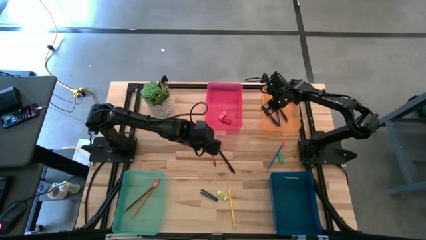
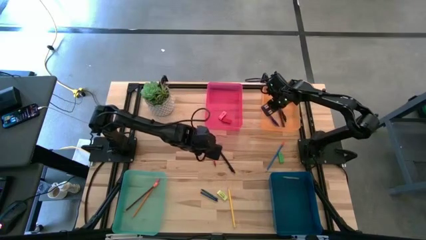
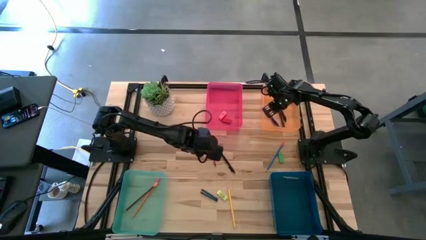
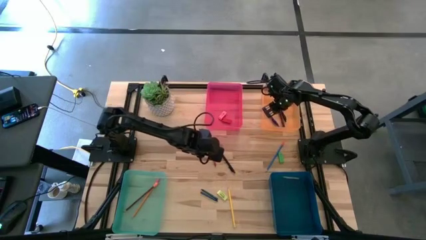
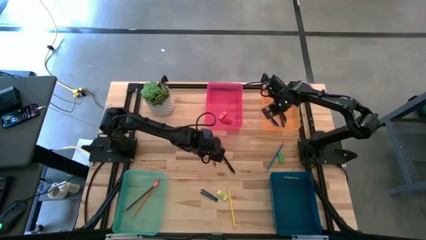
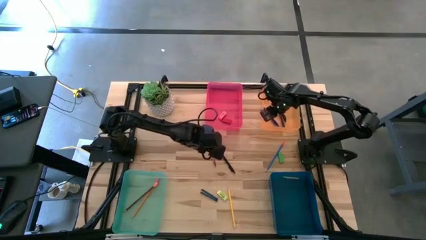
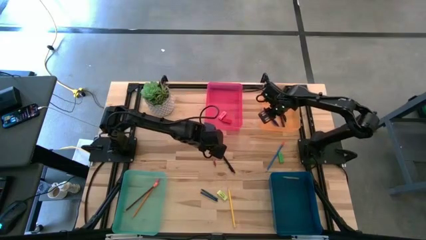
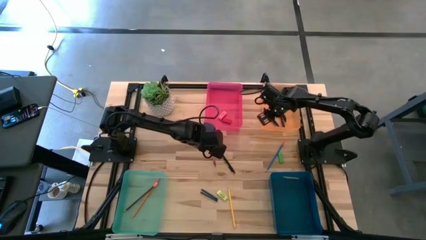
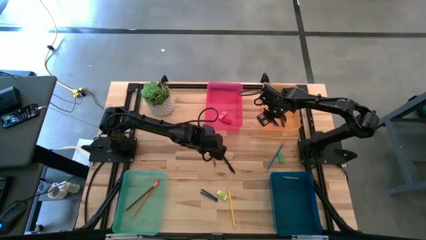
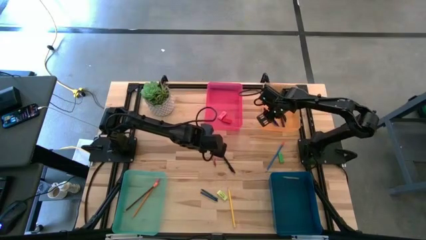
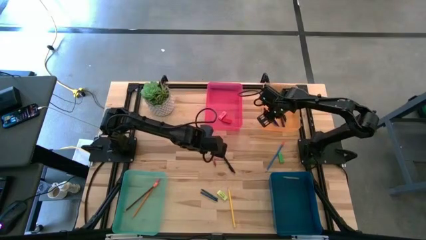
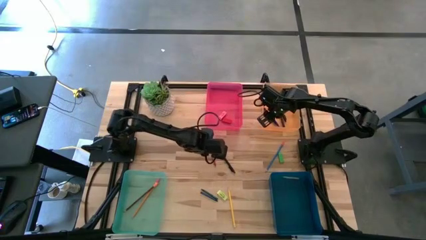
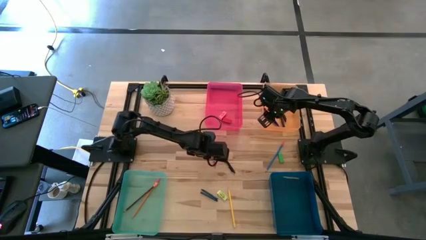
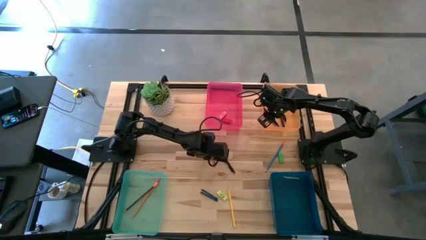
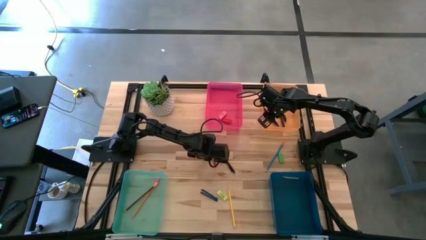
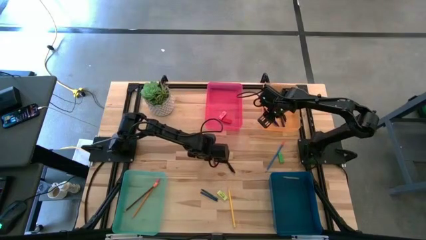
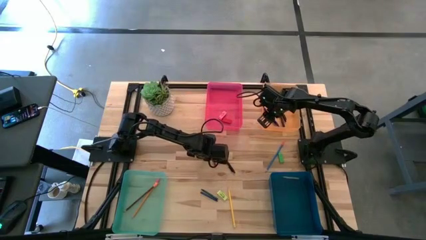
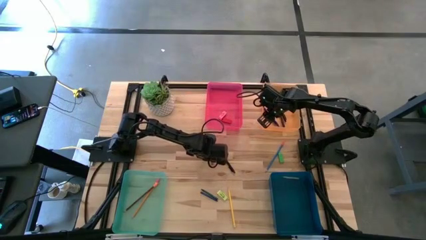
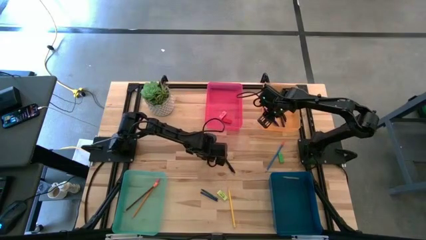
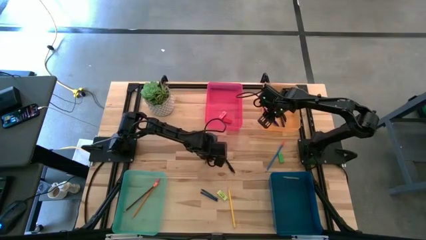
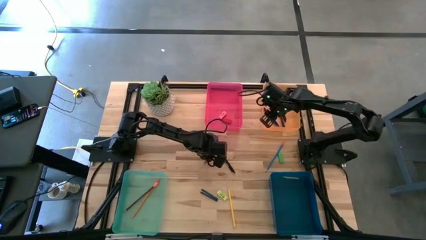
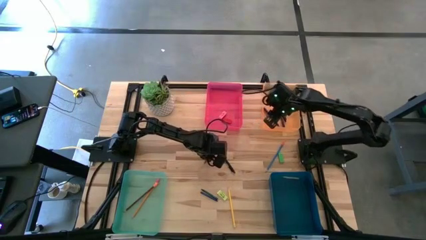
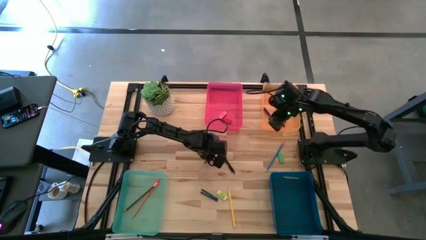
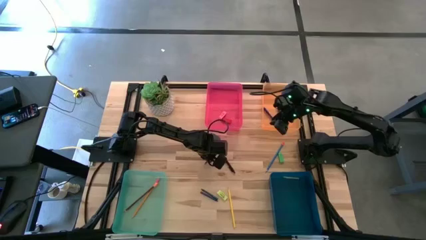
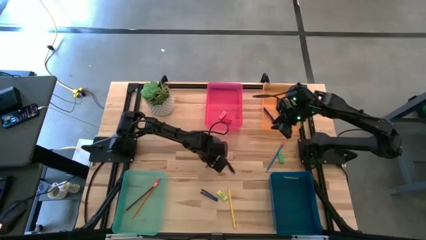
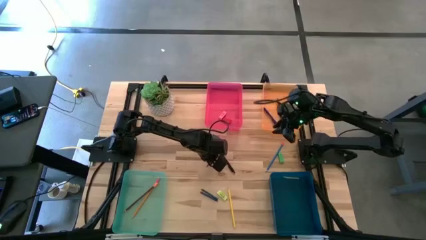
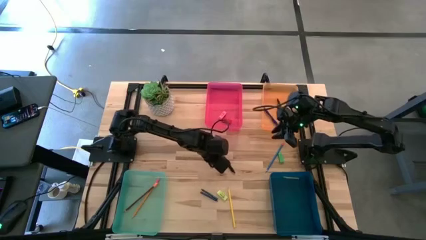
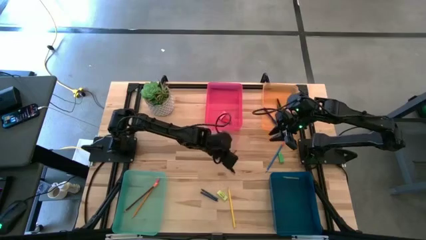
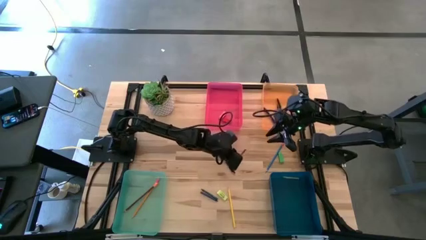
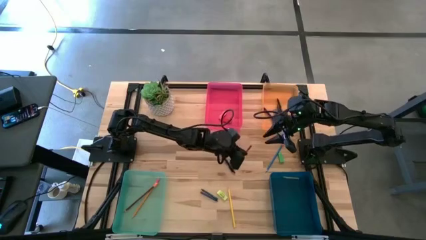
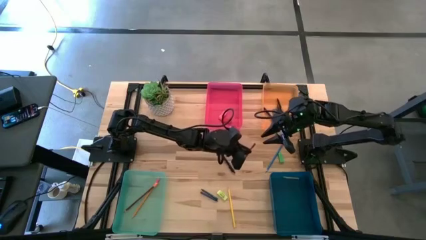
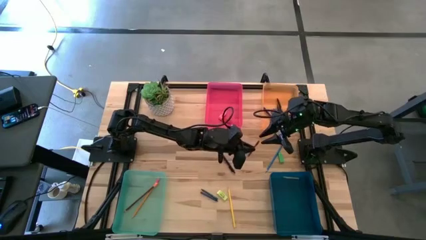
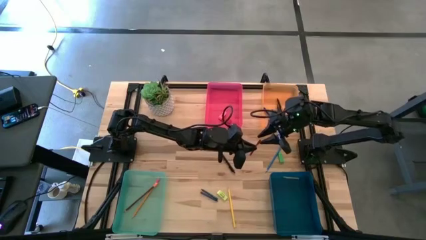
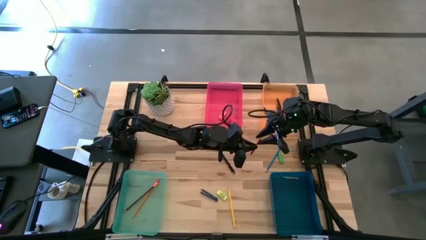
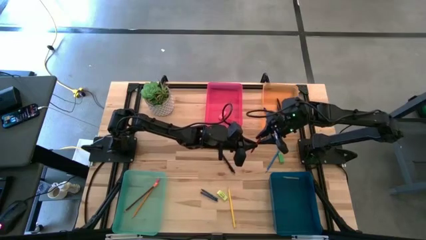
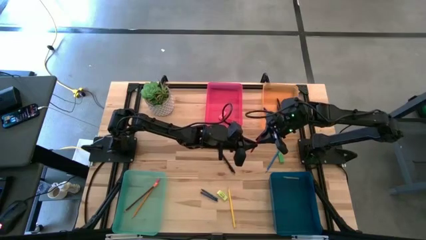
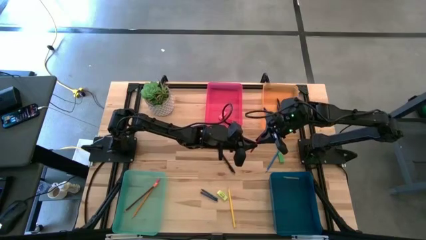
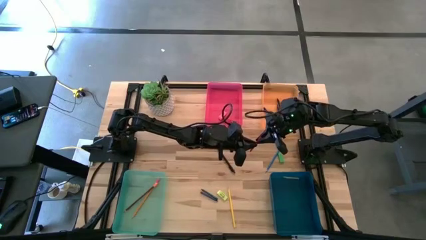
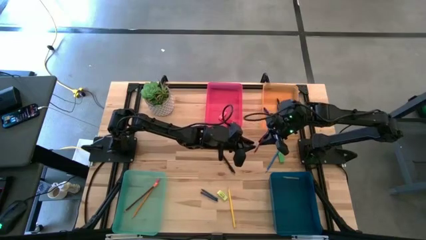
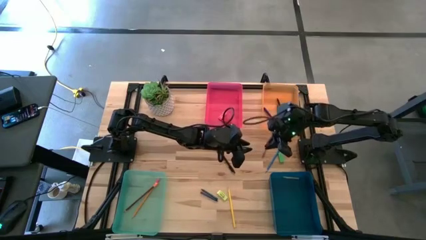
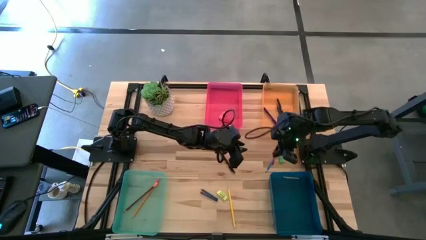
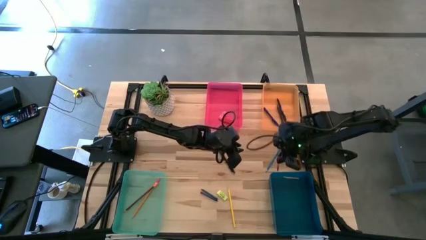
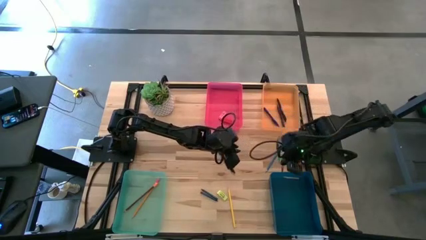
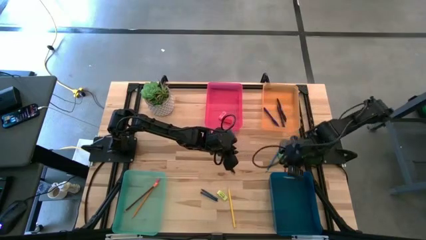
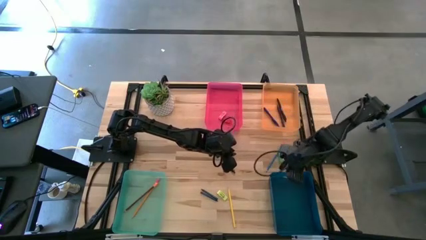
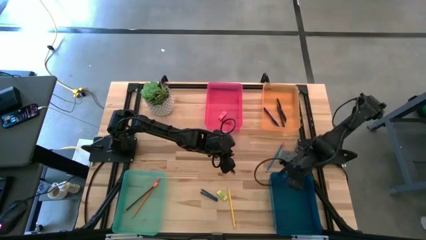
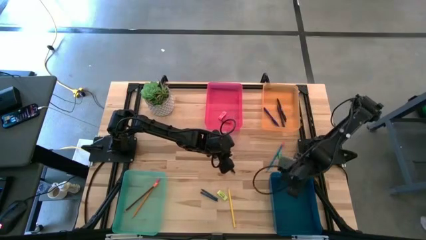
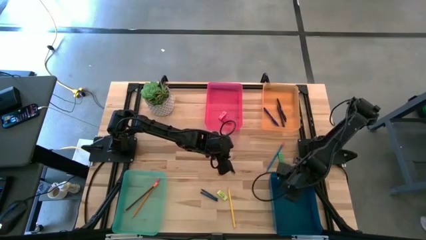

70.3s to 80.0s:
Task: Sort crayons/erasers/pens/pencils in bins
Put the red crayon into the blue bin

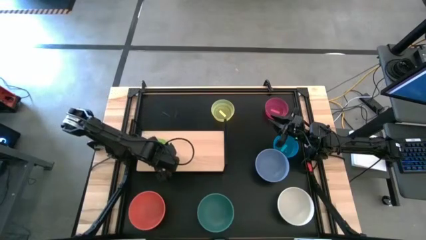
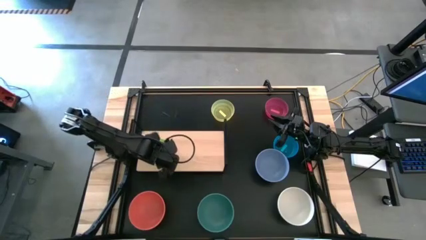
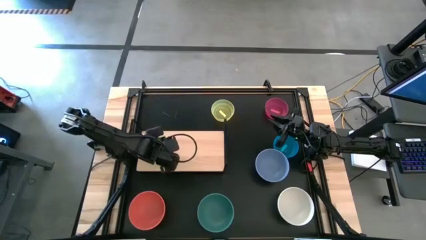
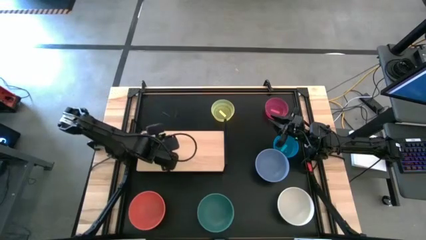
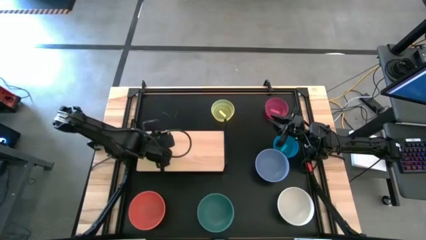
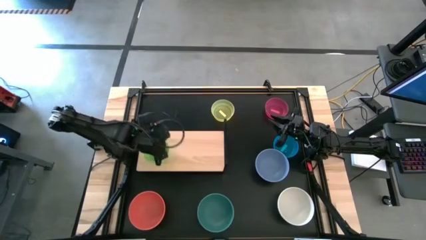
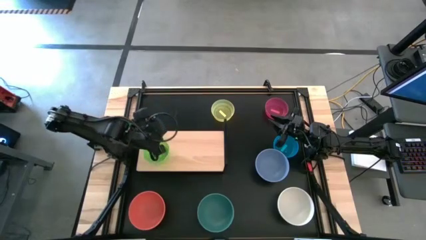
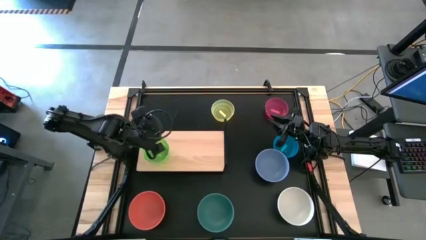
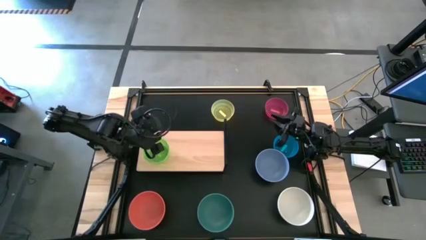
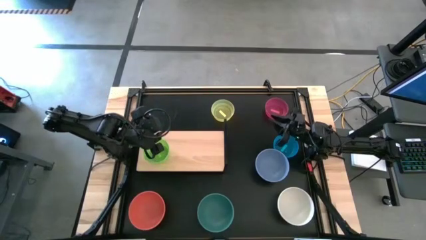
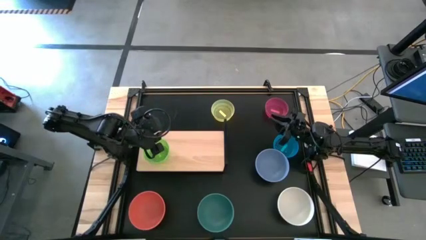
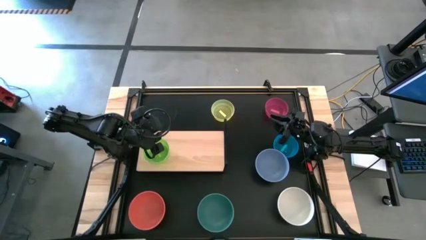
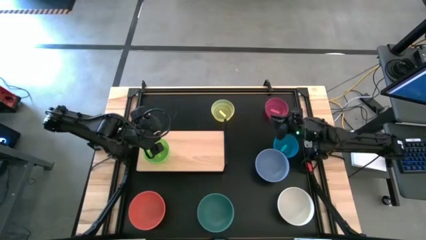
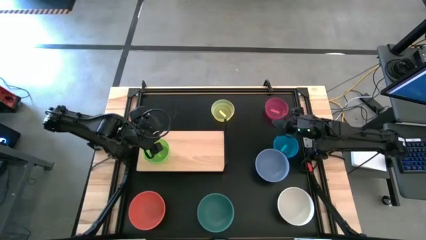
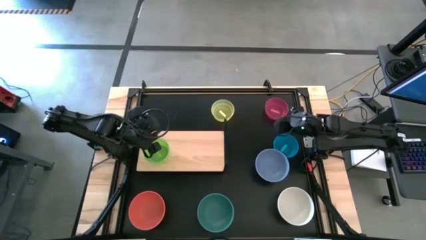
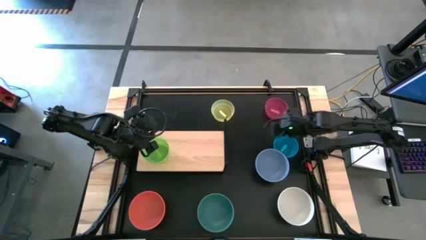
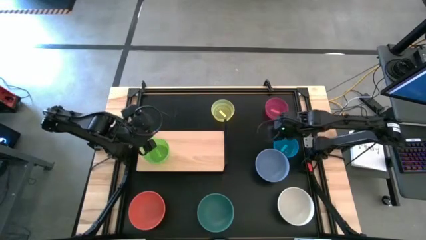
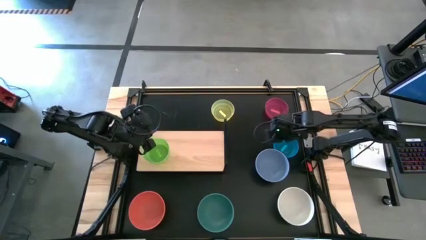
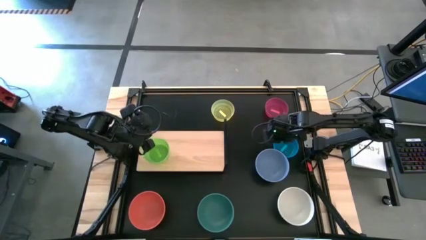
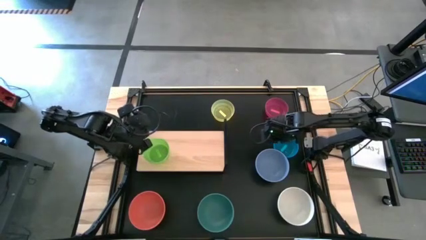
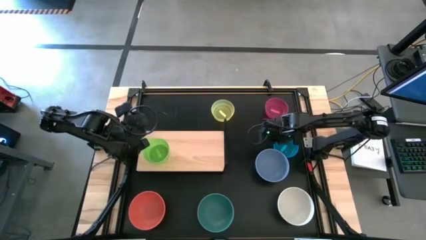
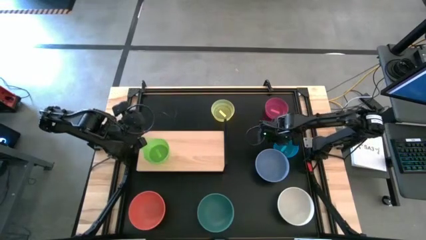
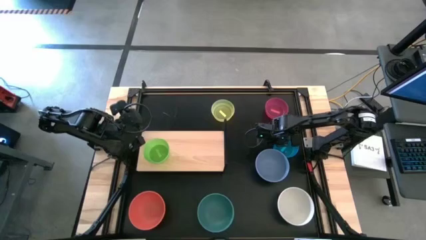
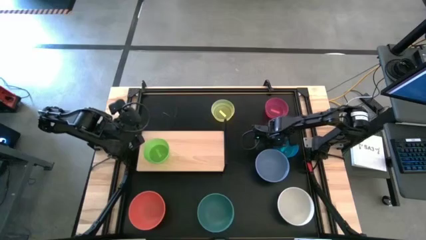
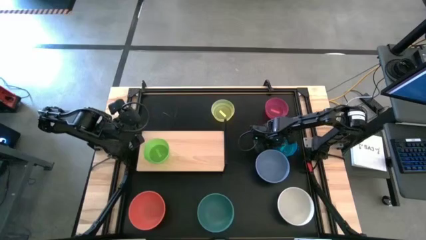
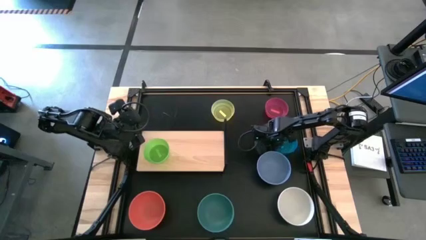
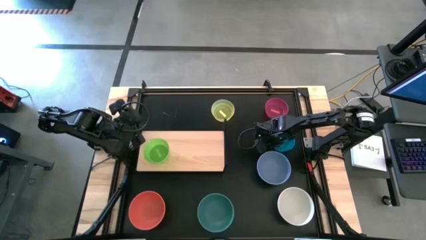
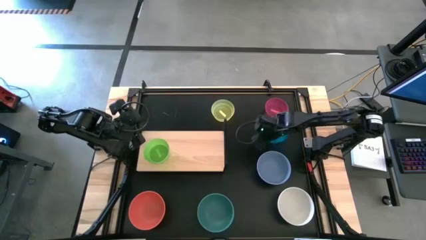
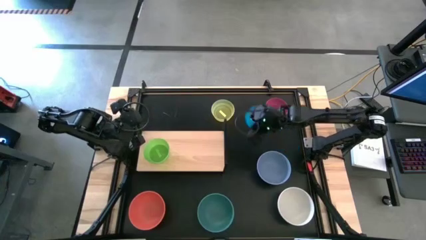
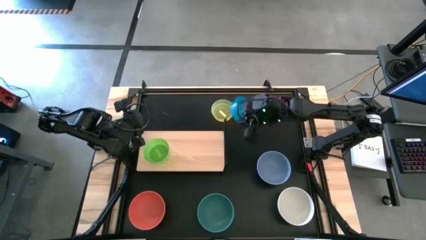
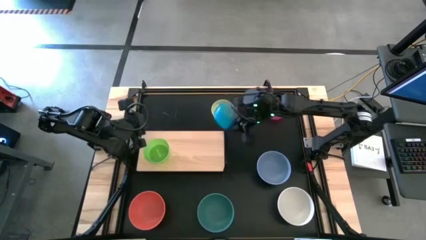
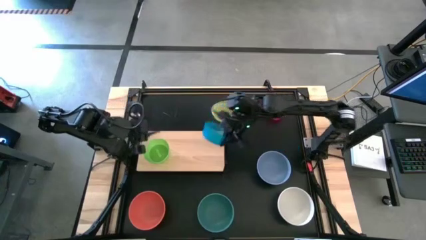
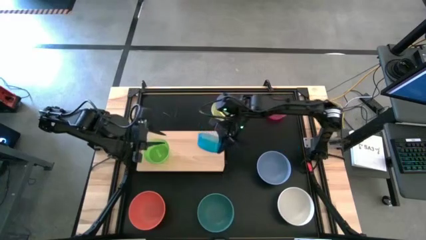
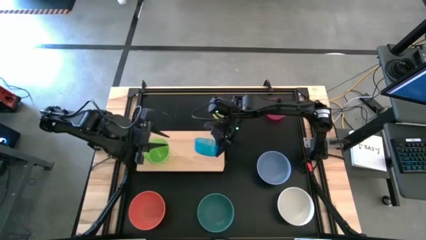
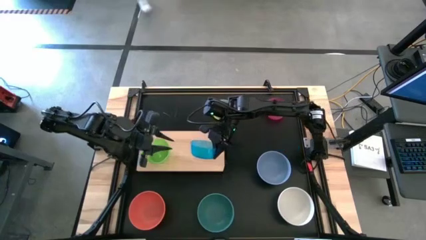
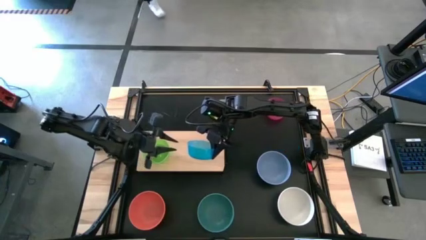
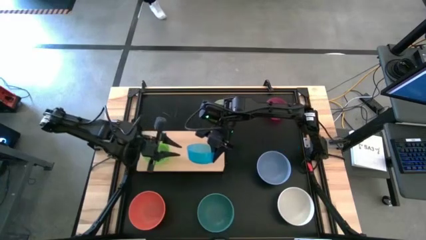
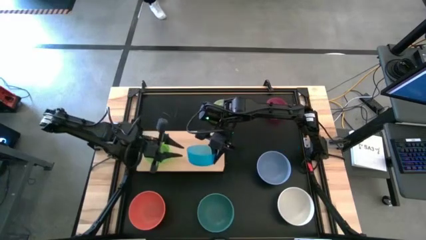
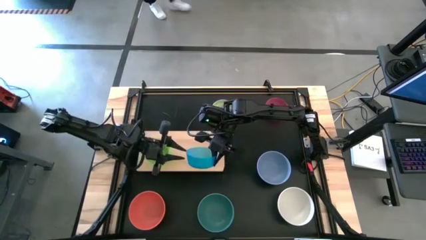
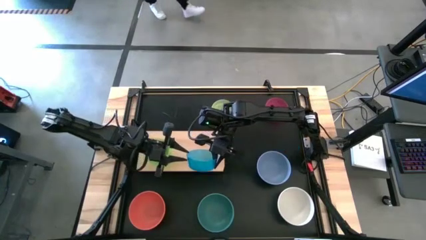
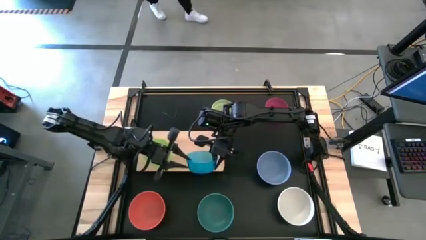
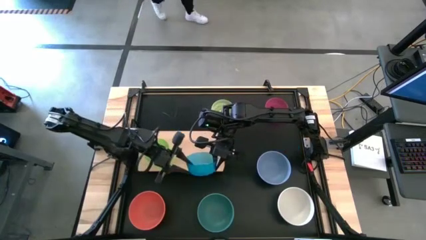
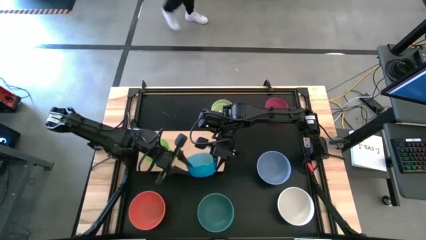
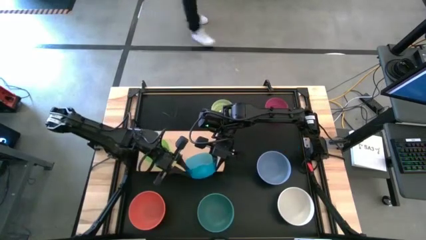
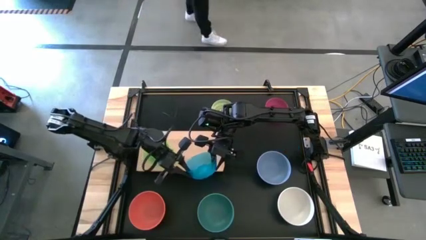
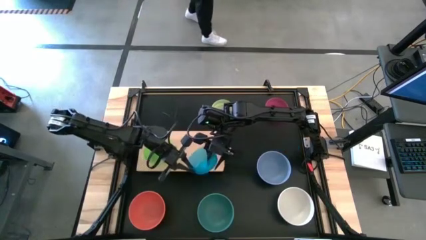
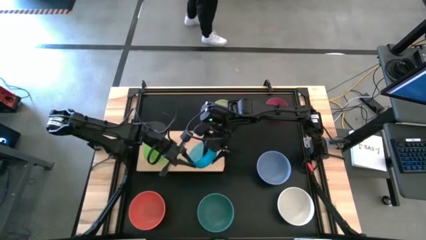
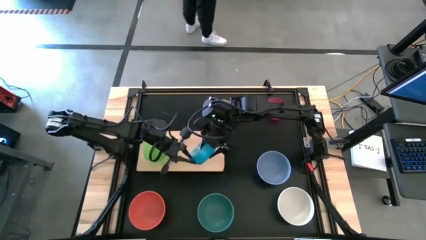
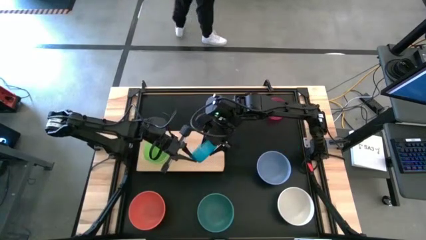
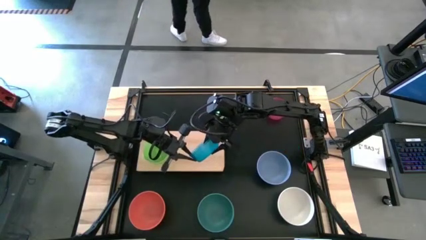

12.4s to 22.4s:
Task: Place and stack bowls onto a shelf
Stack the small blue bowl on top of the small green bowl on the shelf
